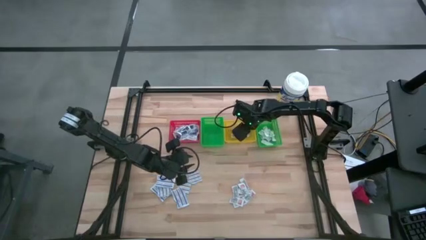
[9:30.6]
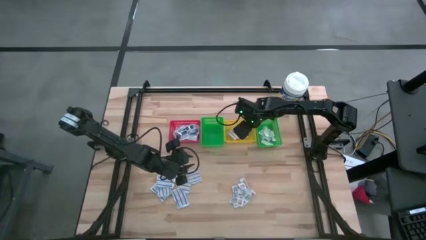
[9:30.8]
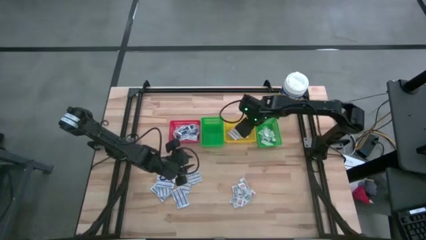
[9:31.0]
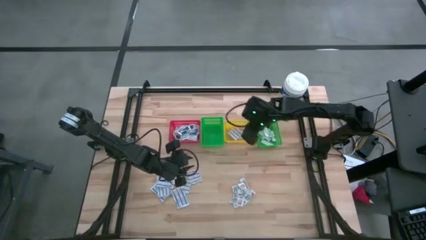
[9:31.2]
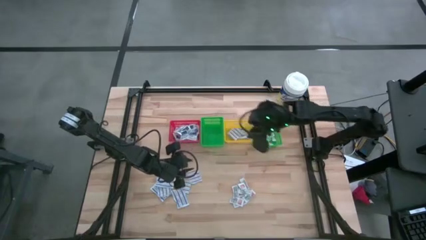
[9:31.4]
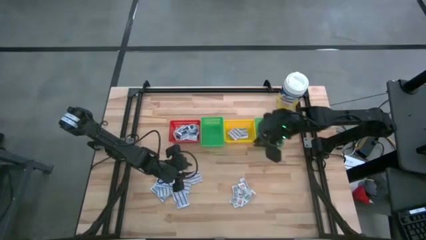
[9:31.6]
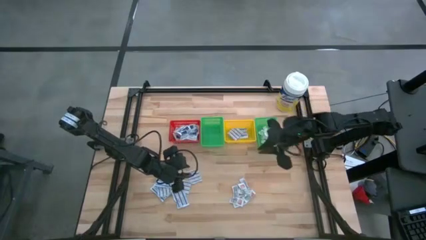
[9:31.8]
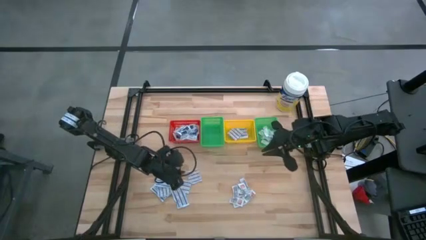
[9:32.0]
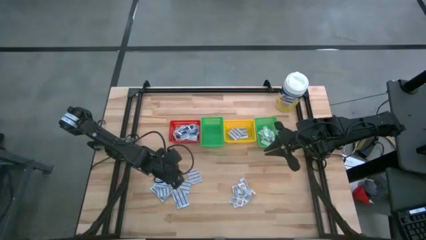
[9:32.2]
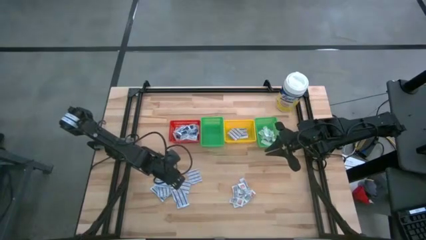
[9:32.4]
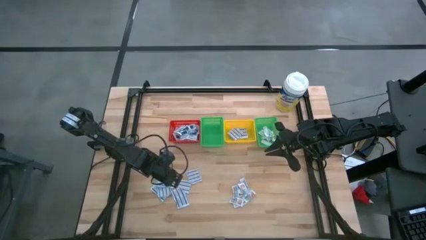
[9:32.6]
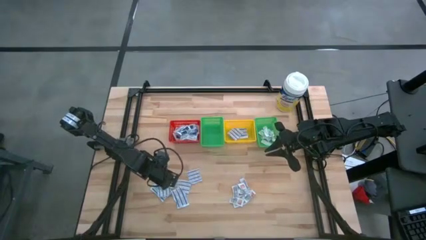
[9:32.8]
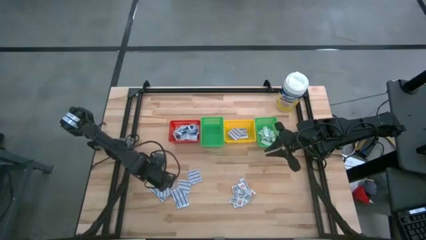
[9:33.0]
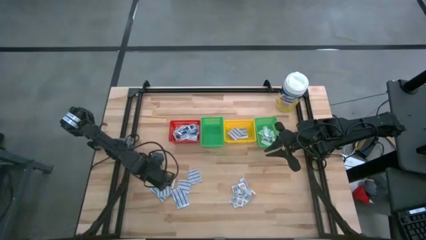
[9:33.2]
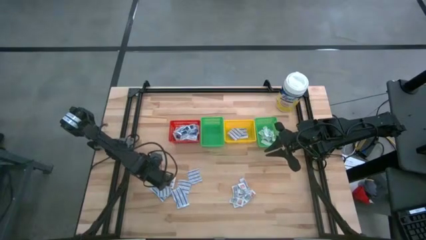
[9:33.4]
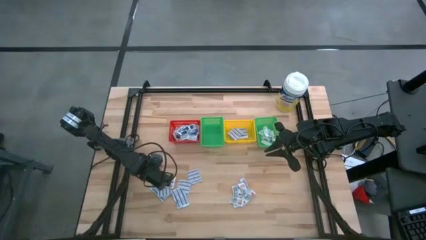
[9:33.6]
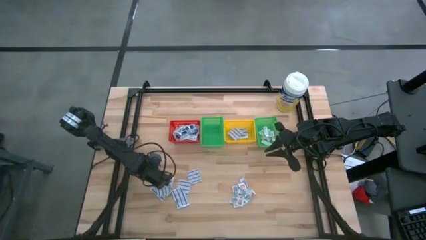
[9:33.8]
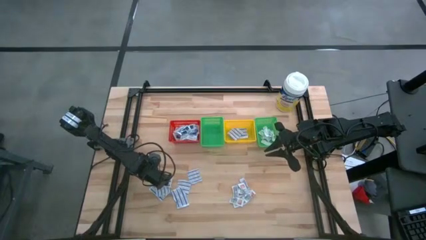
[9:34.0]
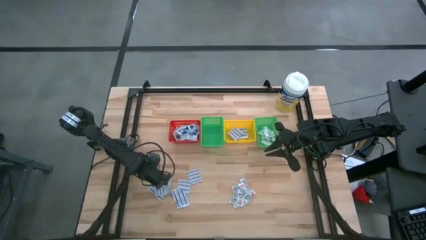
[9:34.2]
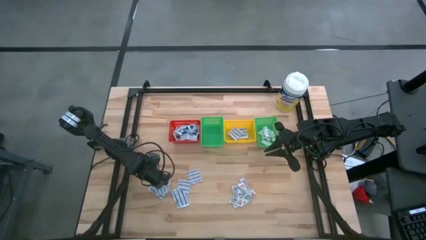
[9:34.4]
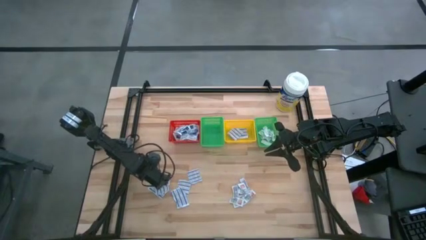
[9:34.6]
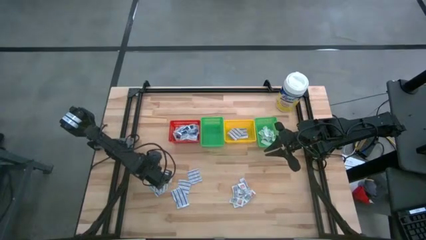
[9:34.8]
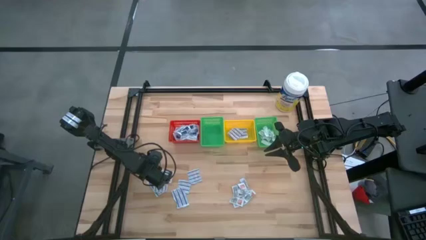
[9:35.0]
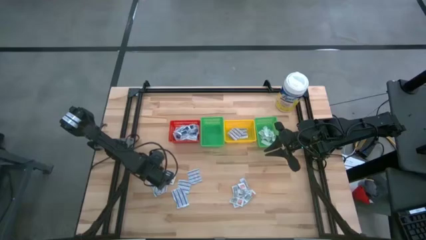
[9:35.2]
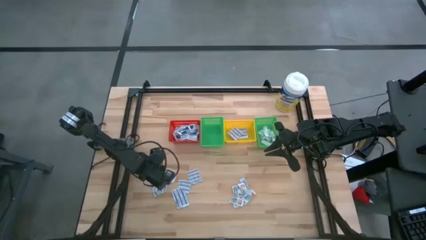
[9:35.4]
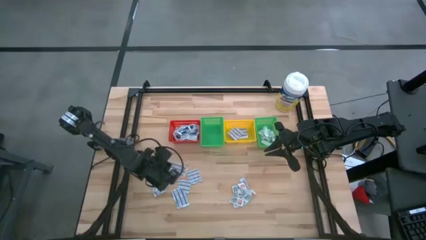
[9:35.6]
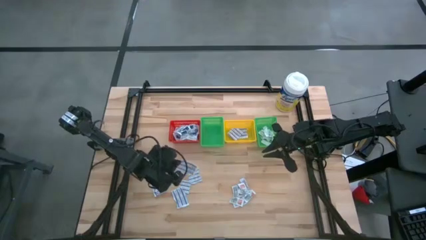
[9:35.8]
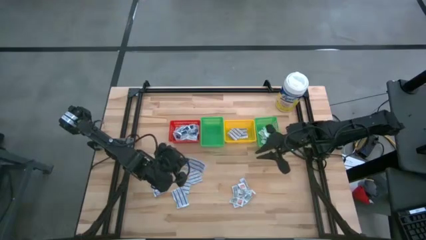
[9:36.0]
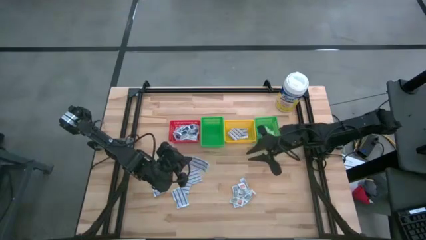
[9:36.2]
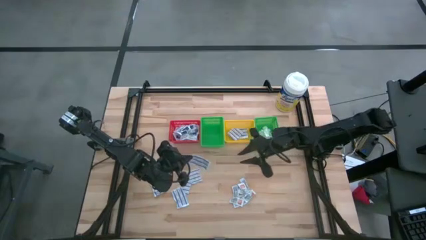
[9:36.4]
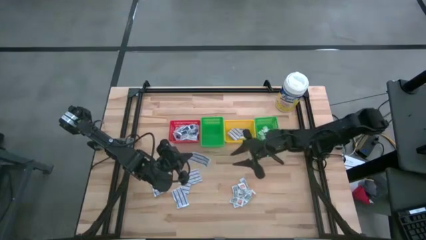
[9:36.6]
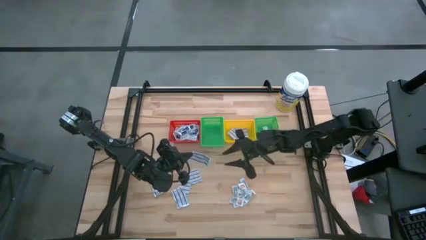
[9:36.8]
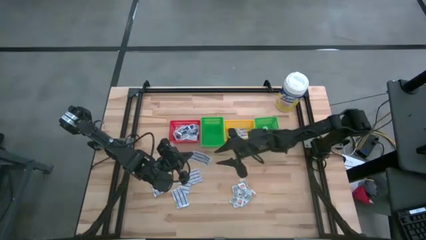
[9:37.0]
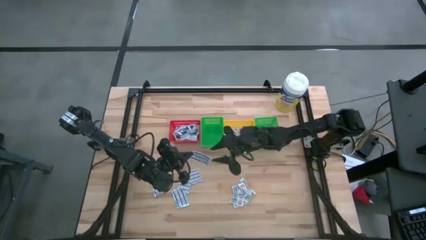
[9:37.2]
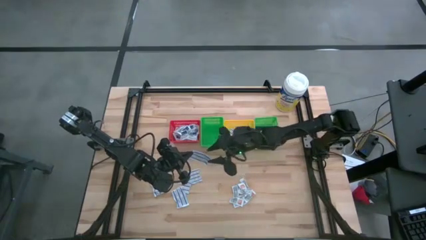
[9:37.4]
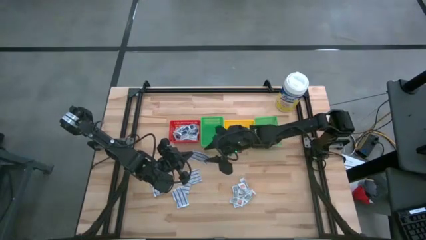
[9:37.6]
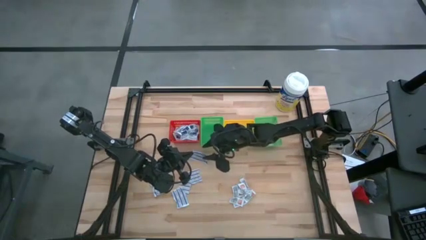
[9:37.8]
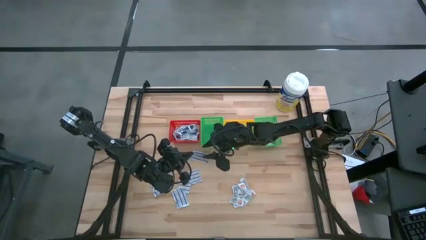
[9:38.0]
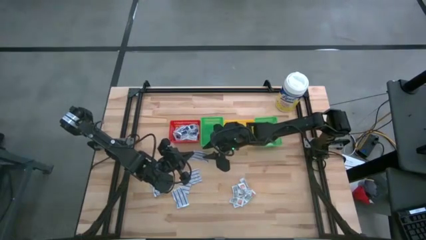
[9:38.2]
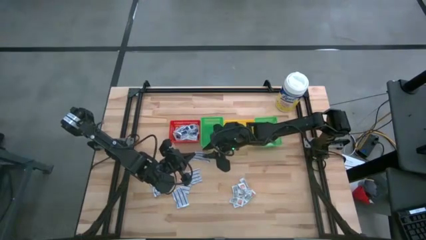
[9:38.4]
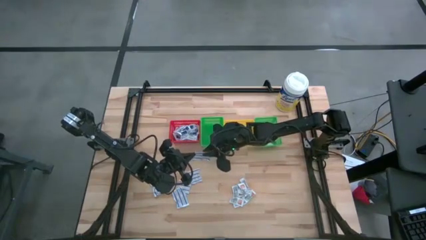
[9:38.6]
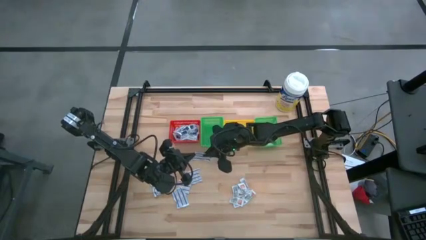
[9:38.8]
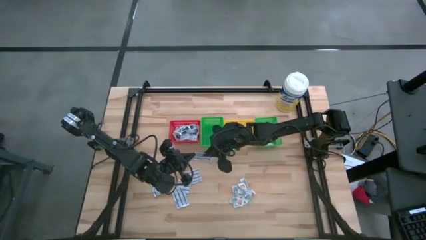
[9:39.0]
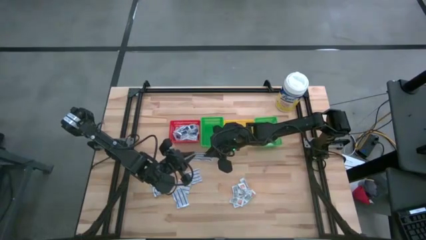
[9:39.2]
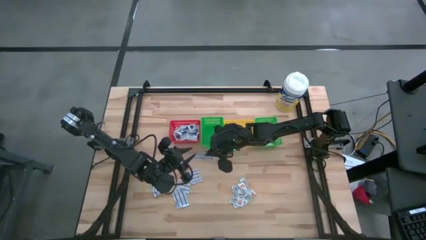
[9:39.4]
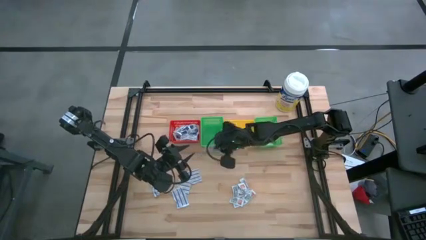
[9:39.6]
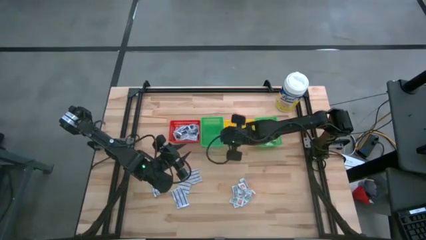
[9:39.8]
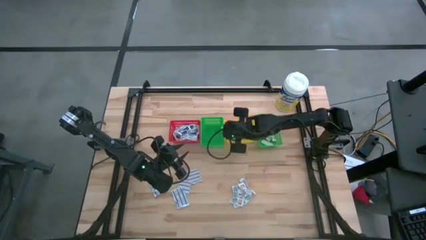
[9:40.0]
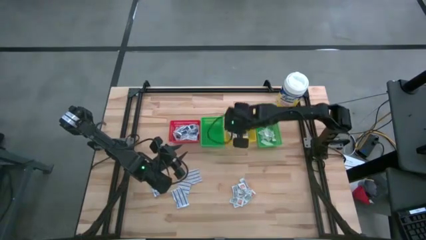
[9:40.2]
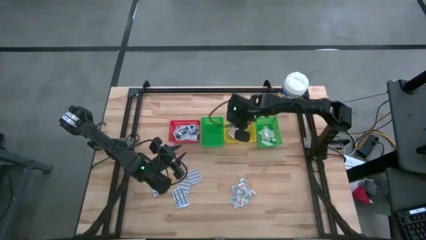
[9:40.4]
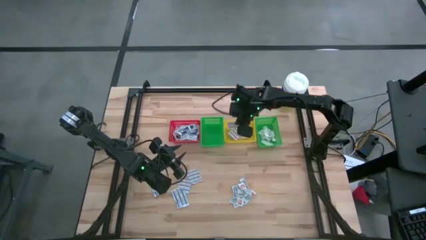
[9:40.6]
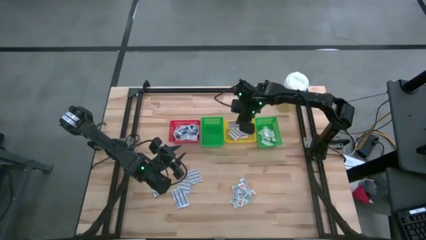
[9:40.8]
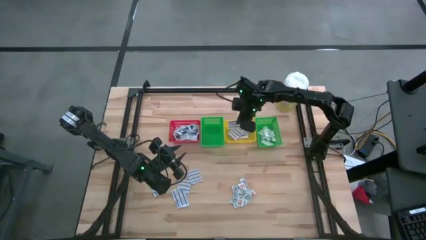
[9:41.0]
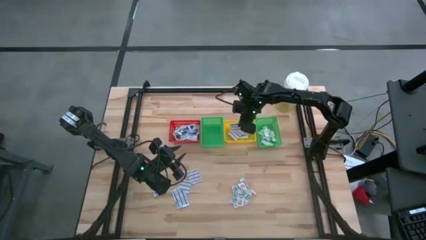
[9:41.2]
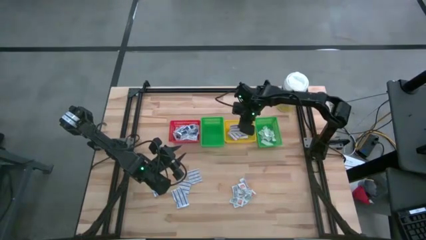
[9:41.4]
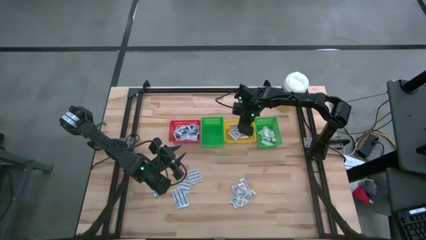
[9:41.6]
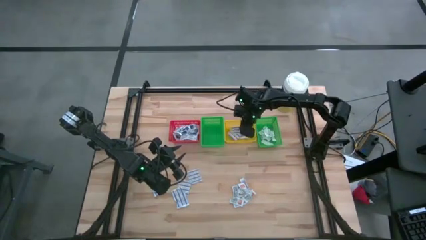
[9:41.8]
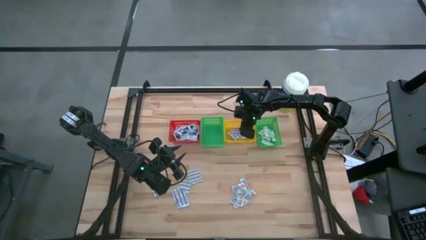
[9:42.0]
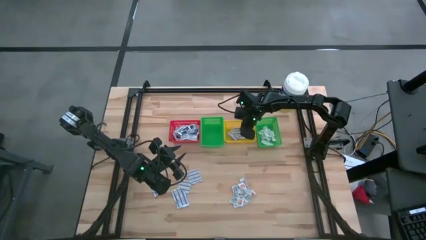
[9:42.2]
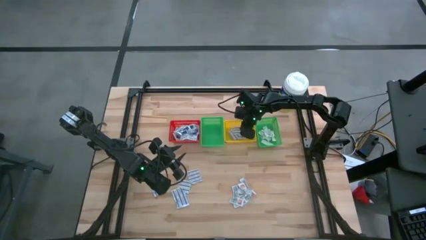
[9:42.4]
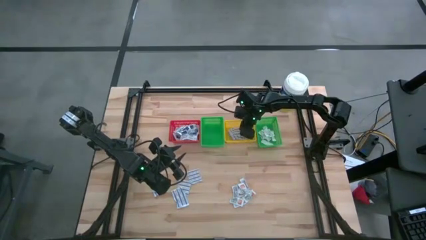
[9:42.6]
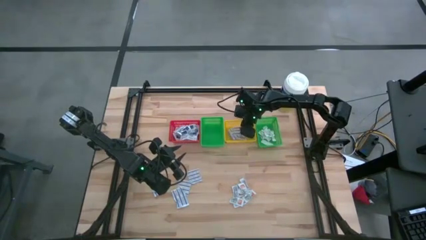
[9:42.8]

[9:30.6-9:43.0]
Task: Pick & Place First Aid Supplies
Put the blue bandage into the yellow basket

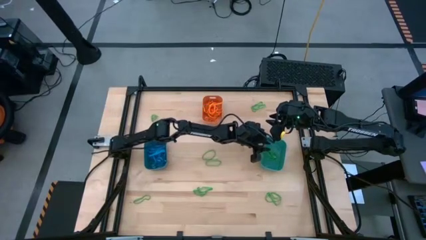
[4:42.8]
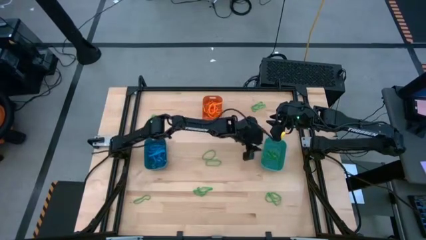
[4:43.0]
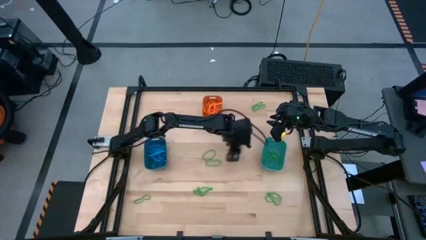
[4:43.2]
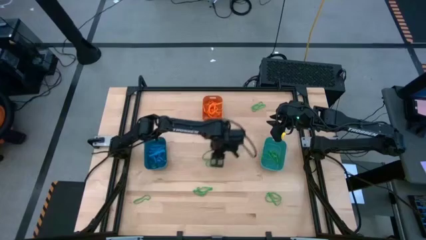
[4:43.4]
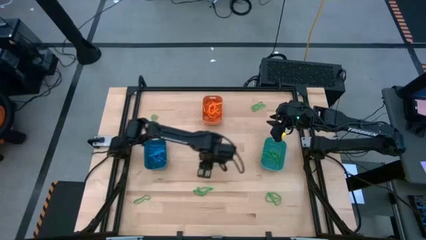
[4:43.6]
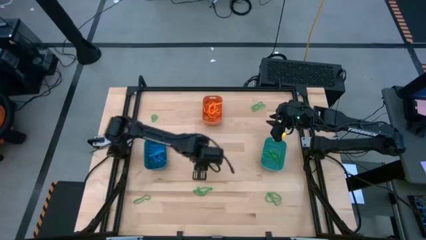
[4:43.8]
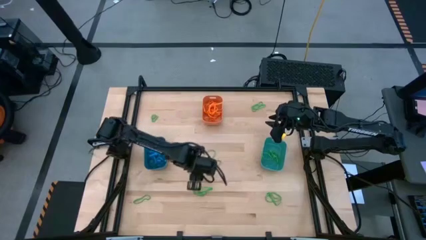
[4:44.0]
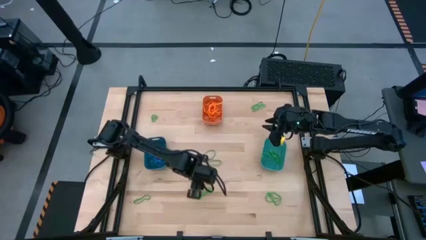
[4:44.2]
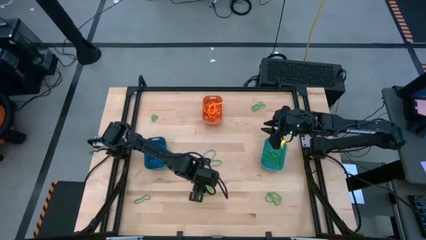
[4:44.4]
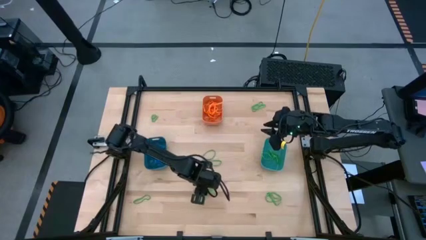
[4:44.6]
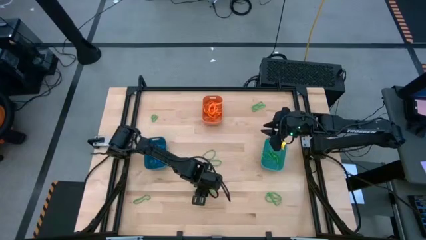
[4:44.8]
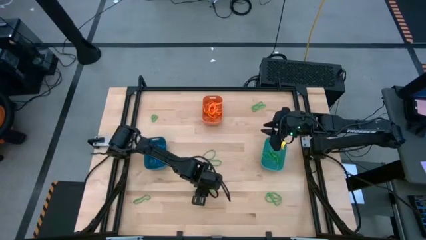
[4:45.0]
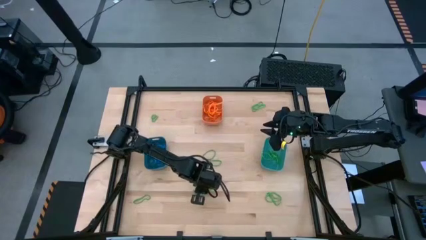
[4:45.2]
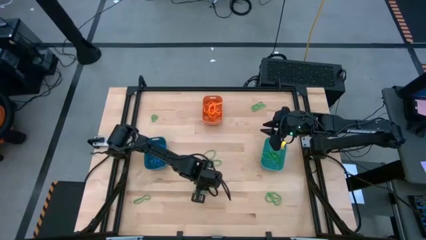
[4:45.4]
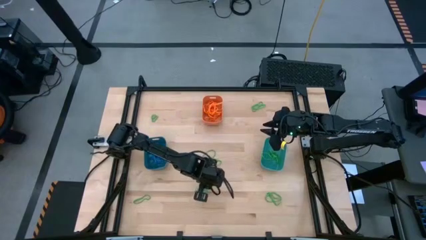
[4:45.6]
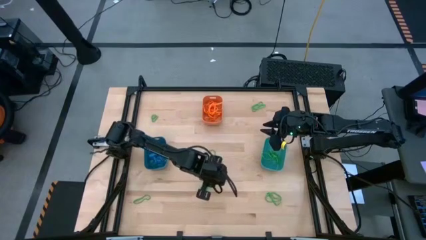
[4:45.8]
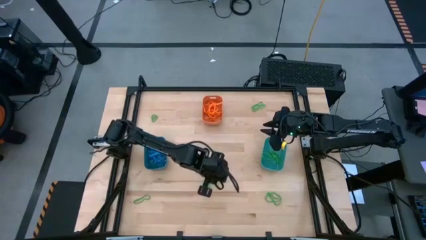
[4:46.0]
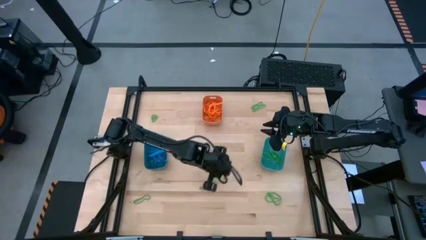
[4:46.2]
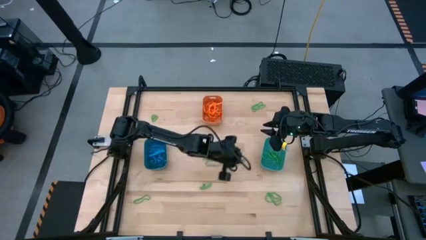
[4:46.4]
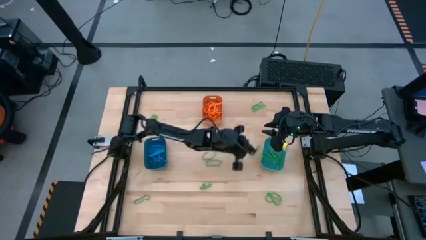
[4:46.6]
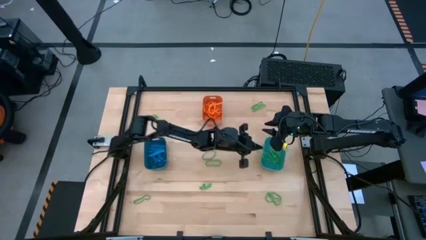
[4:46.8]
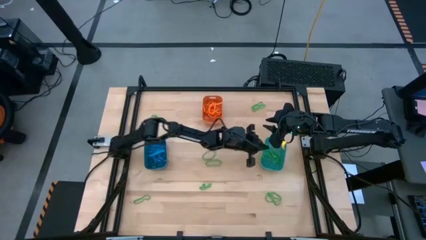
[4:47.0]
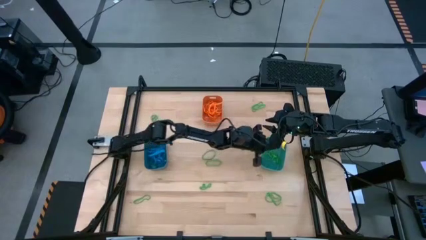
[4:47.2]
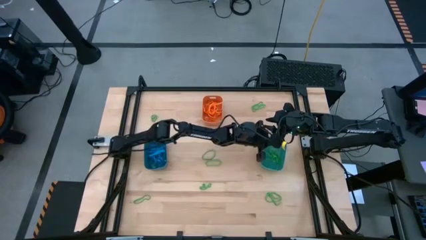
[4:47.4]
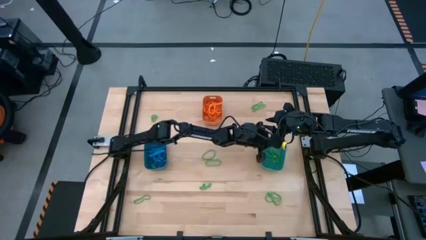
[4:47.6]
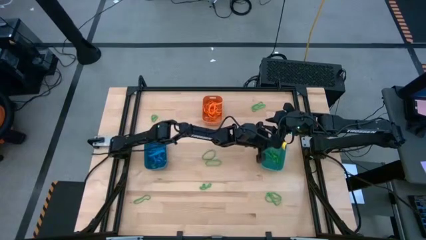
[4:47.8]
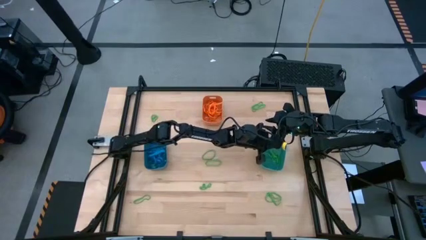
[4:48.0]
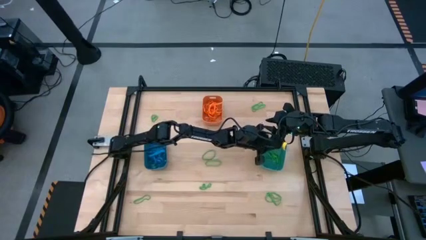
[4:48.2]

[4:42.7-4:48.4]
Task: Sort rubber bands into baskets
Put the green rubber band into the green bin
